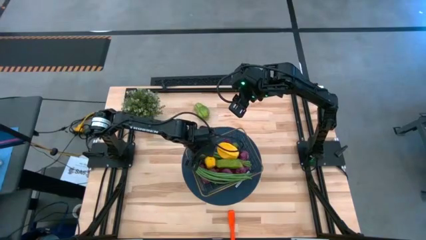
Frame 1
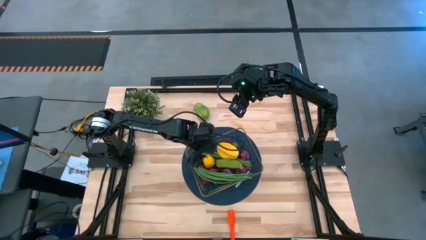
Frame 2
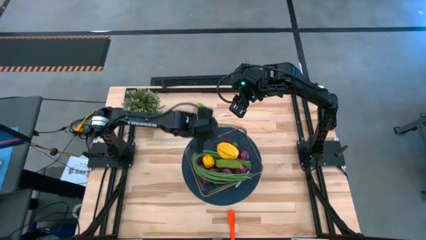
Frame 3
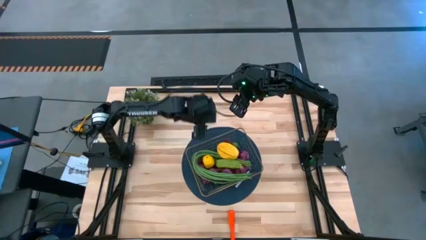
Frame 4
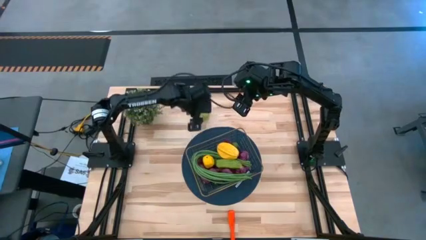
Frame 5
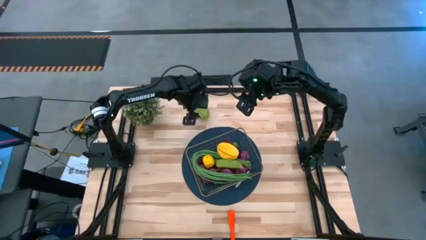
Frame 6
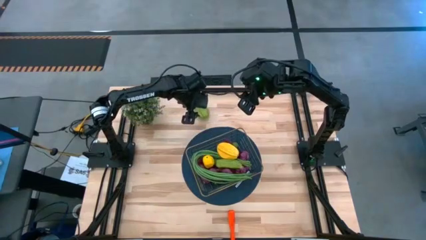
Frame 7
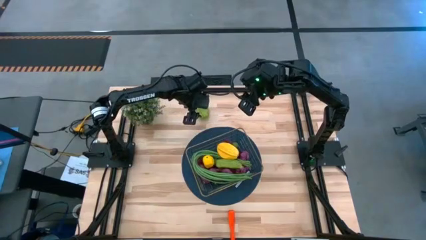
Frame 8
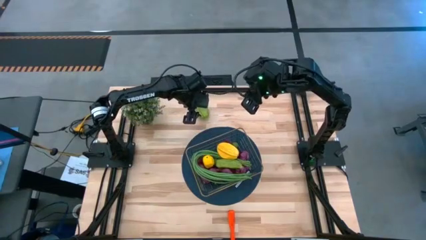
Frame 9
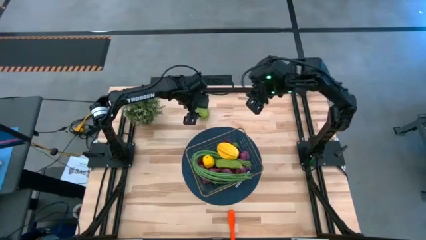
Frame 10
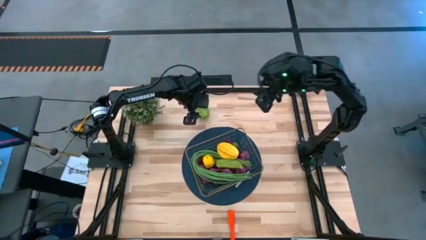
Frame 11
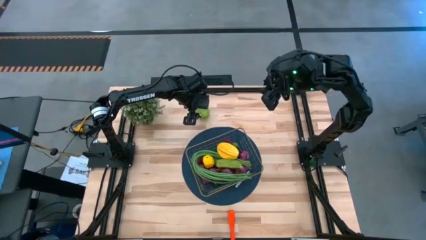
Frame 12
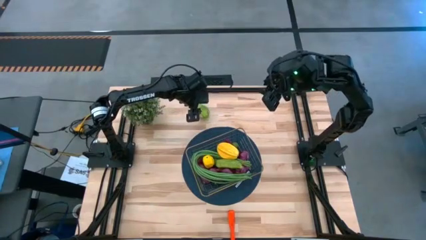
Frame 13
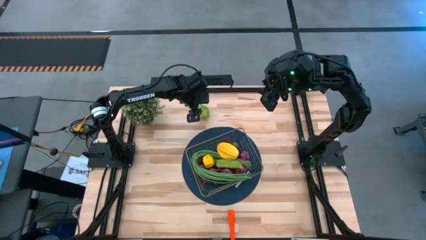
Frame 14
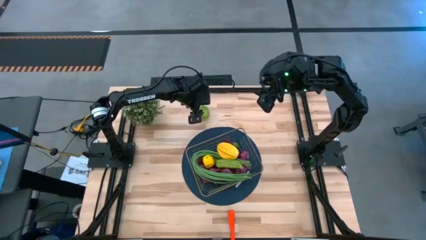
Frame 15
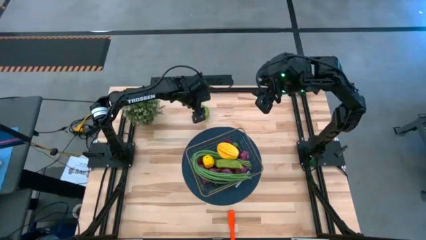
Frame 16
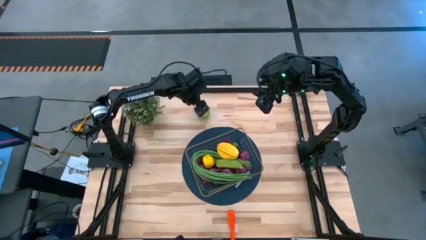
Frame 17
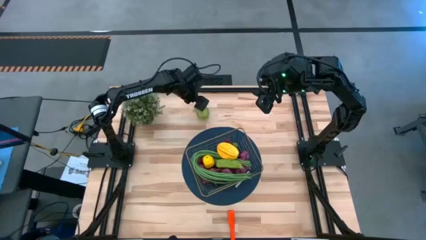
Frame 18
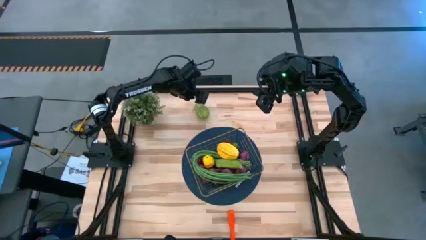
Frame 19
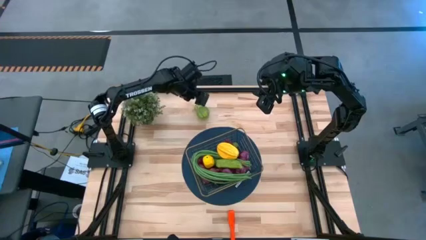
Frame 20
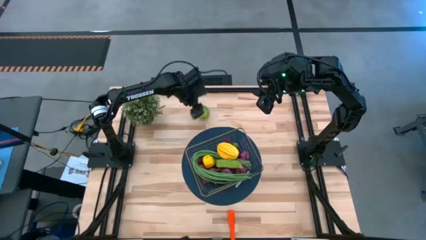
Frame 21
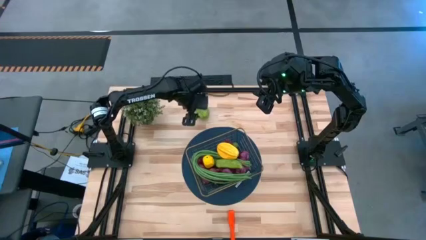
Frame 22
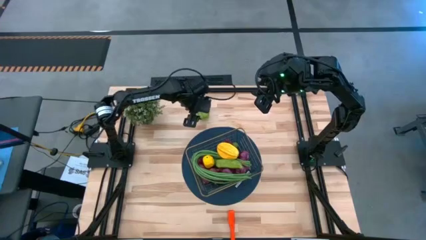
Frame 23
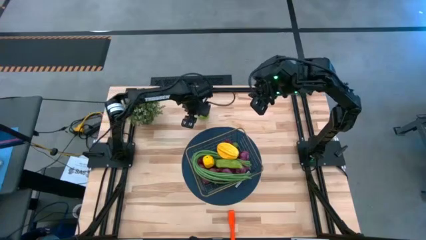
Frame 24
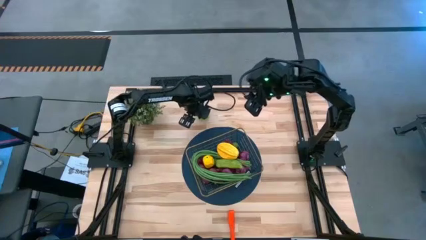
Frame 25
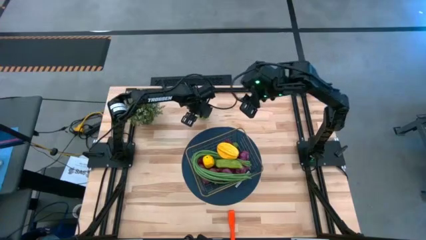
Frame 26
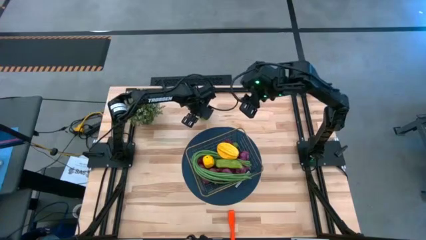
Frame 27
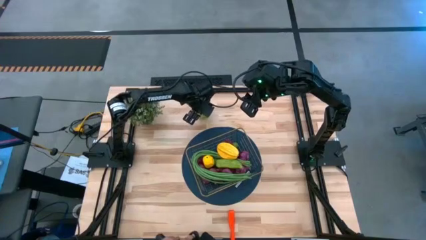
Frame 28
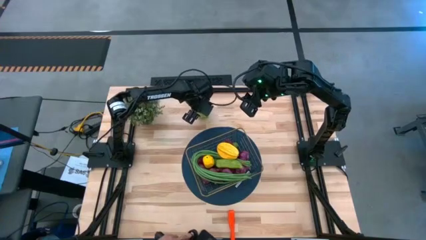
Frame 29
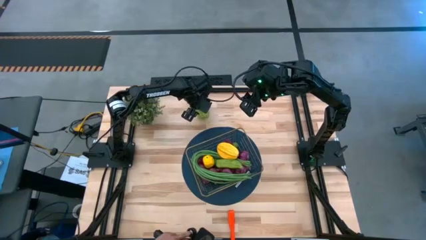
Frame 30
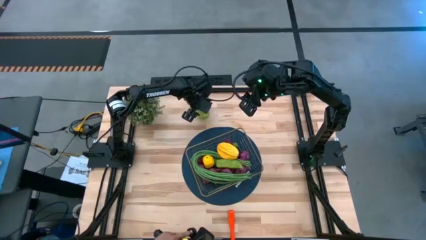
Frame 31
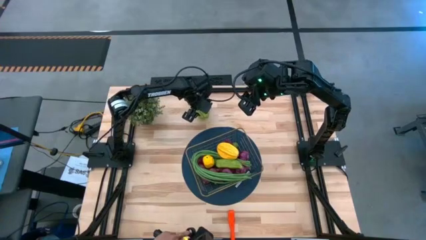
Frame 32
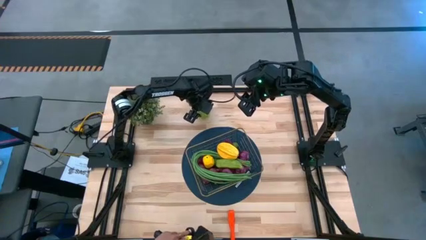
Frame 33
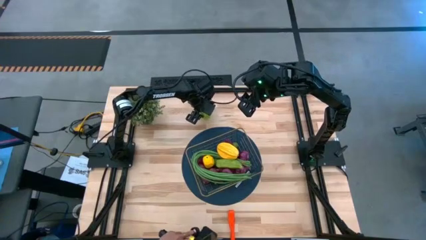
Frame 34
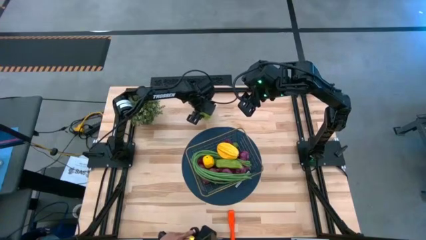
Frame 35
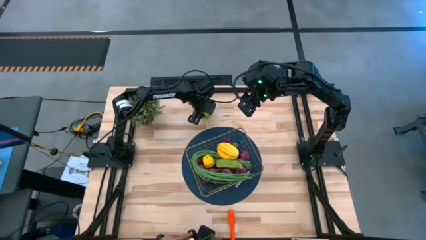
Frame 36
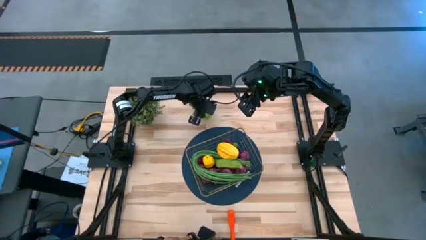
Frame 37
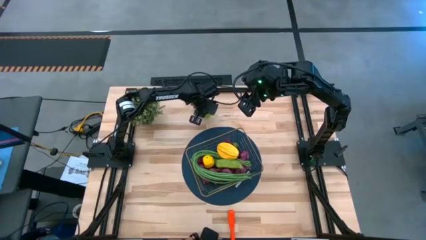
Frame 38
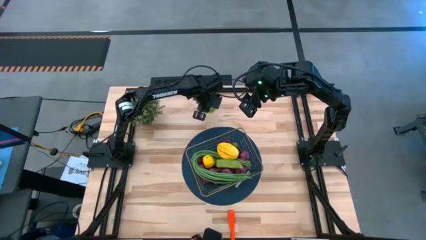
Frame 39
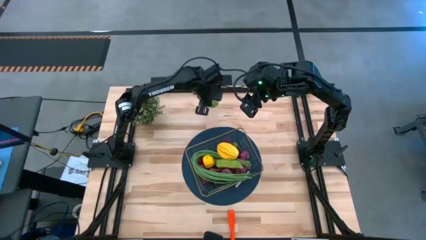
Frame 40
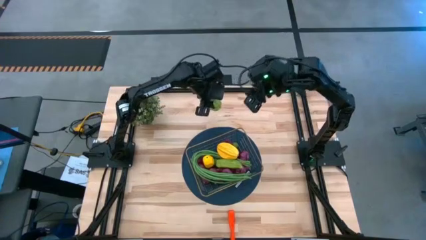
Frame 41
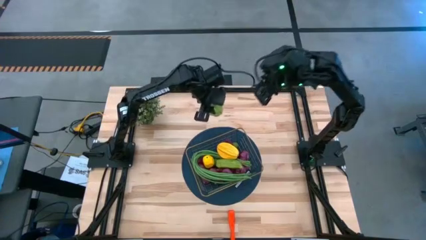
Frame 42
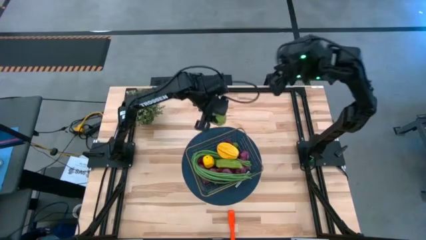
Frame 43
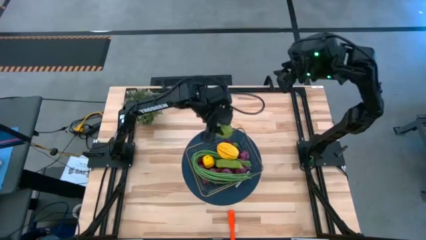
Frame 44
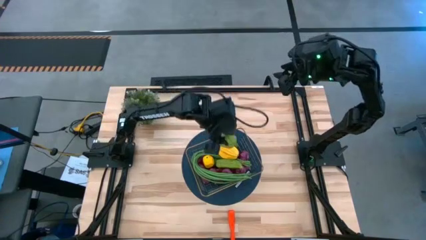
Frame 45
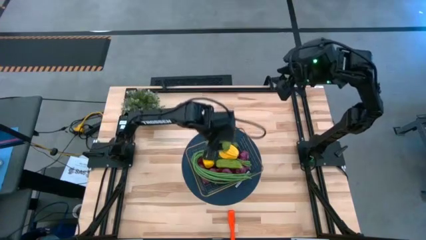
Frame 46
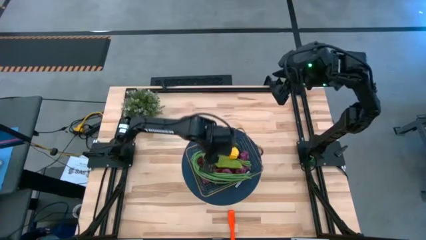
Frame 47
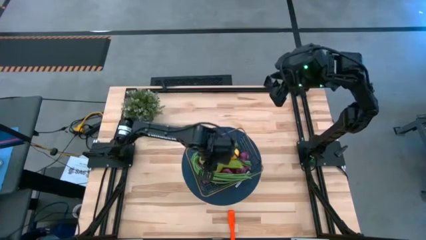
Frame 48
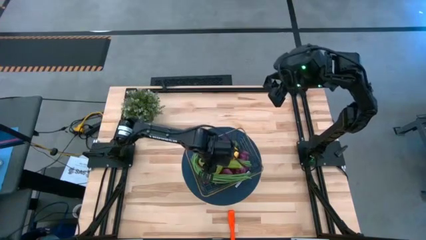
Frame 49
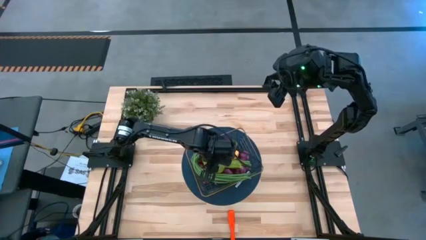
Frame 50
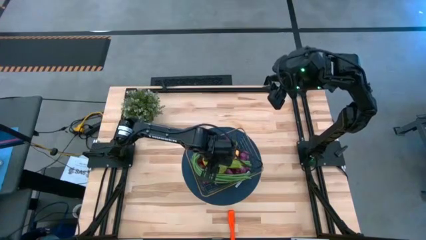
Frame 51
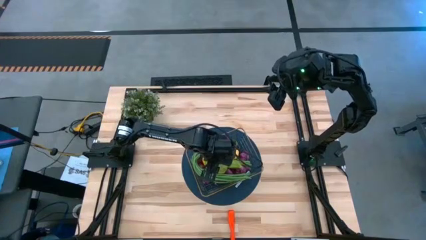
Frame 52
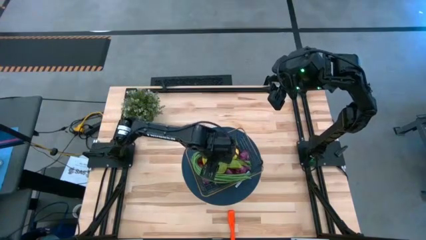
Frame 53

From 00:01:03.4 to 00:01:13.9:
Task: Build produce basket
Put the green chayote into the gold wire basket
